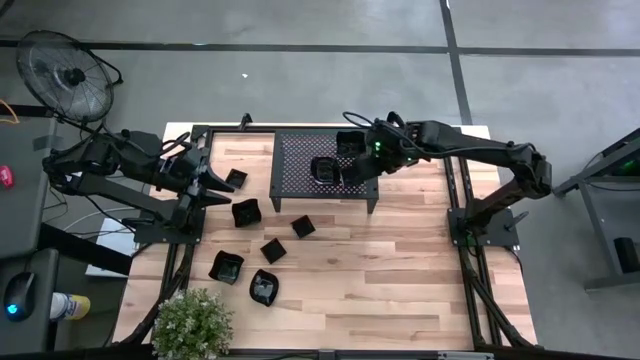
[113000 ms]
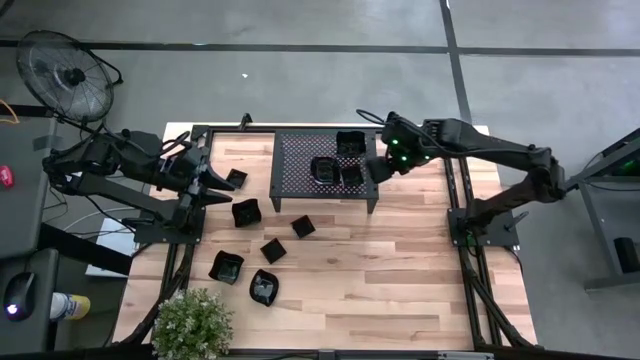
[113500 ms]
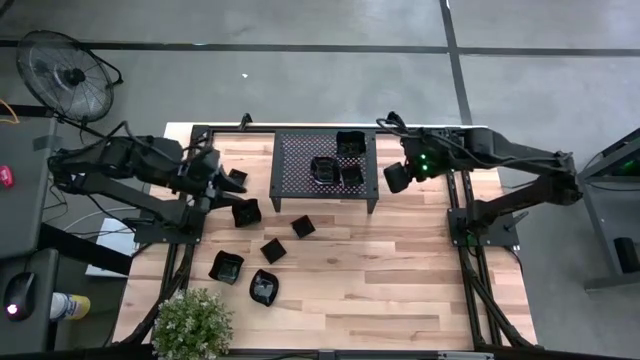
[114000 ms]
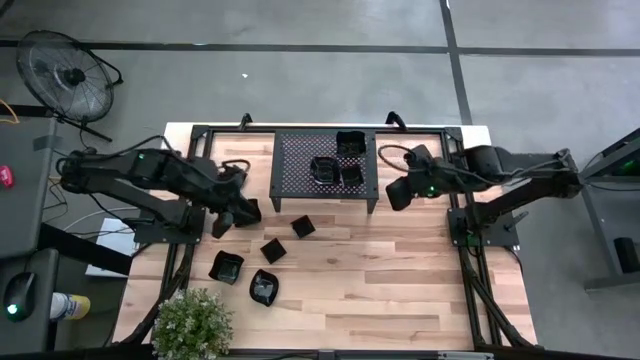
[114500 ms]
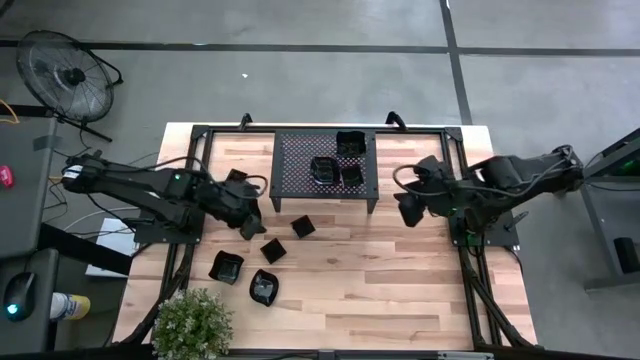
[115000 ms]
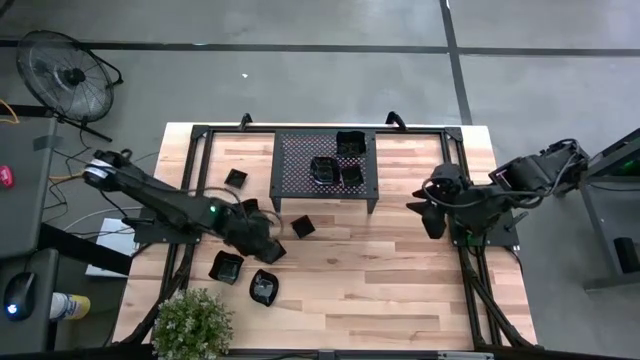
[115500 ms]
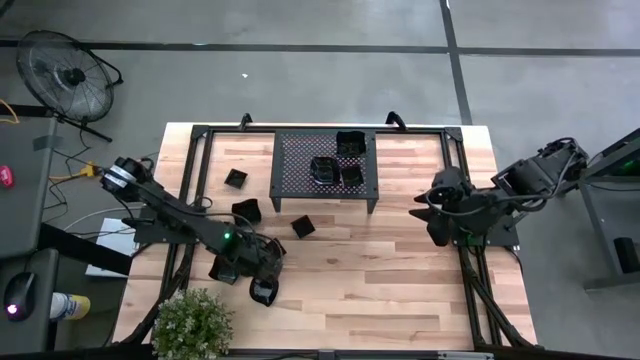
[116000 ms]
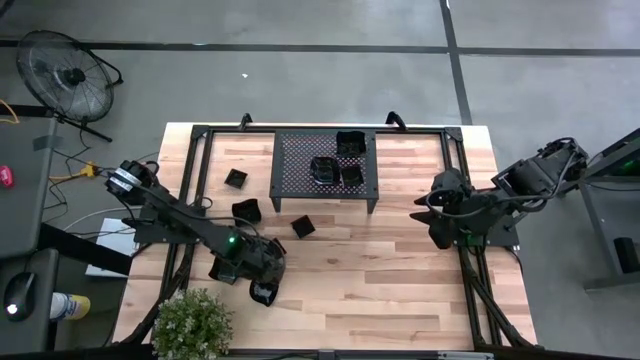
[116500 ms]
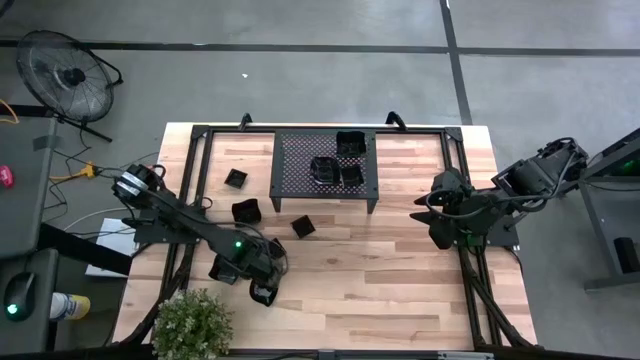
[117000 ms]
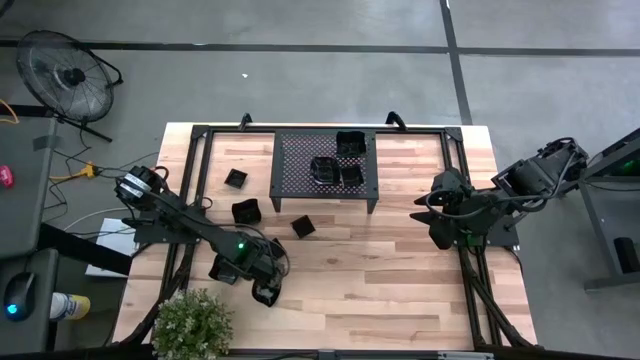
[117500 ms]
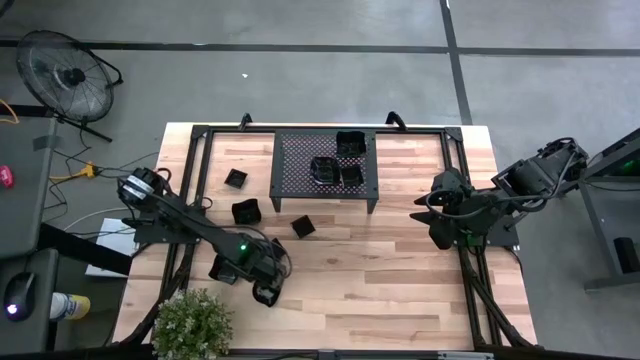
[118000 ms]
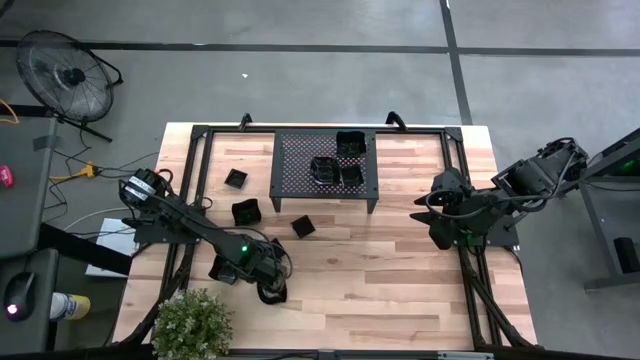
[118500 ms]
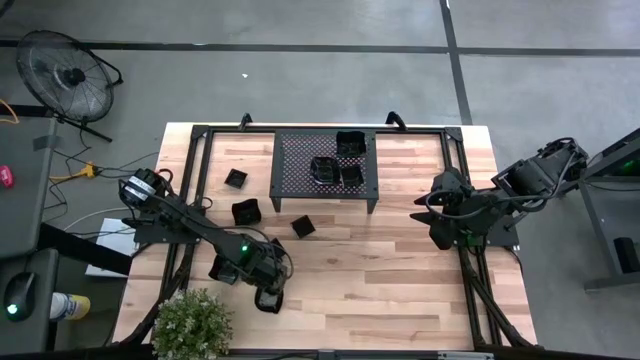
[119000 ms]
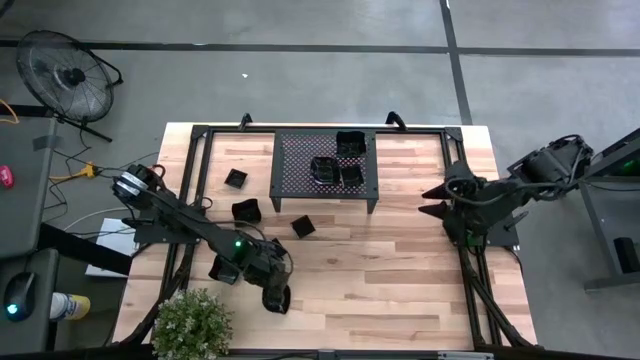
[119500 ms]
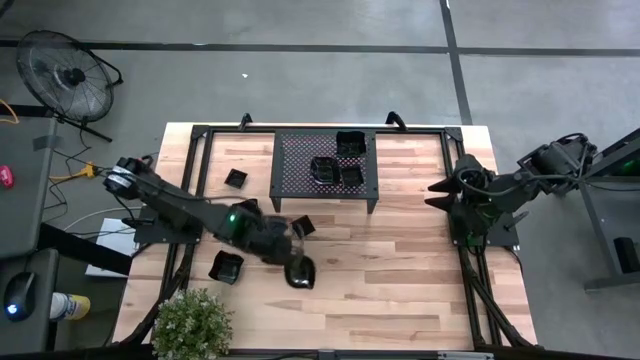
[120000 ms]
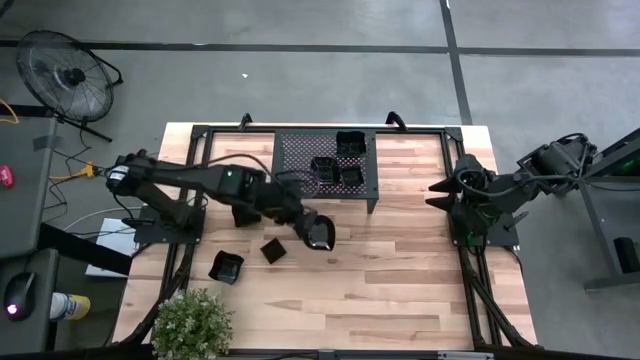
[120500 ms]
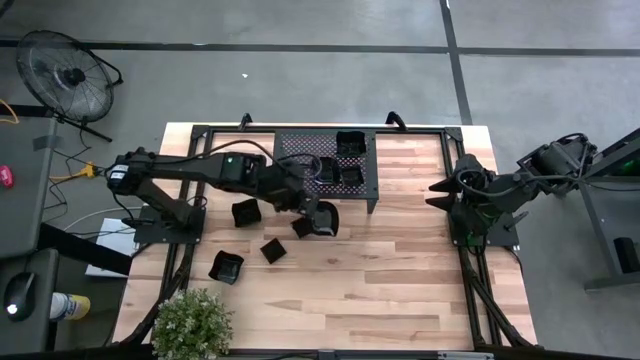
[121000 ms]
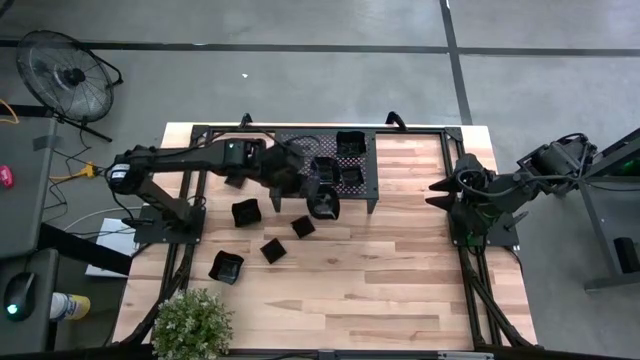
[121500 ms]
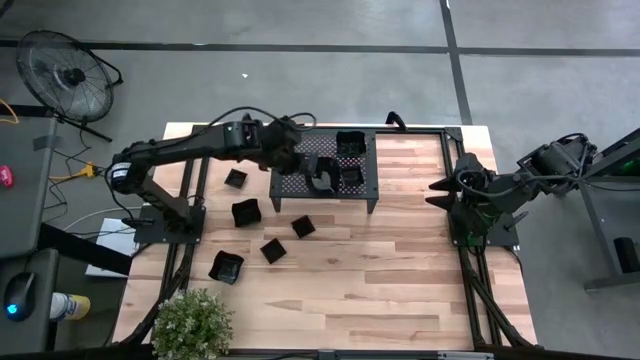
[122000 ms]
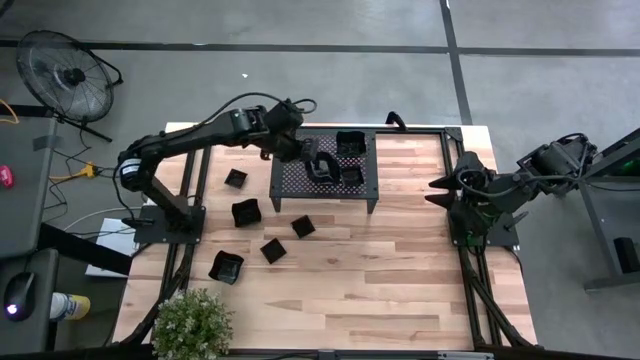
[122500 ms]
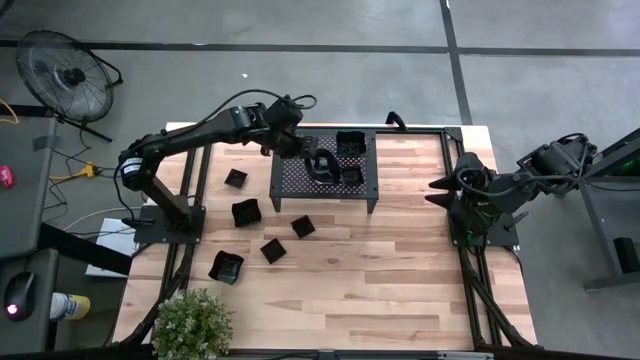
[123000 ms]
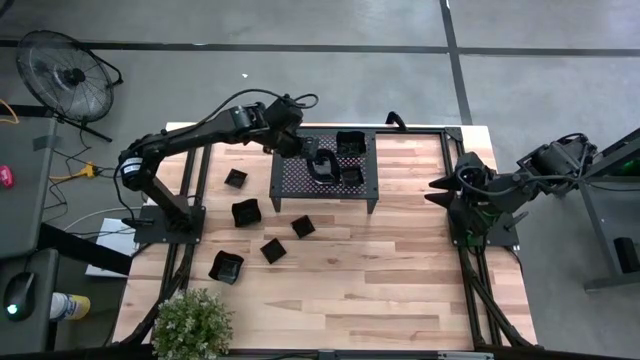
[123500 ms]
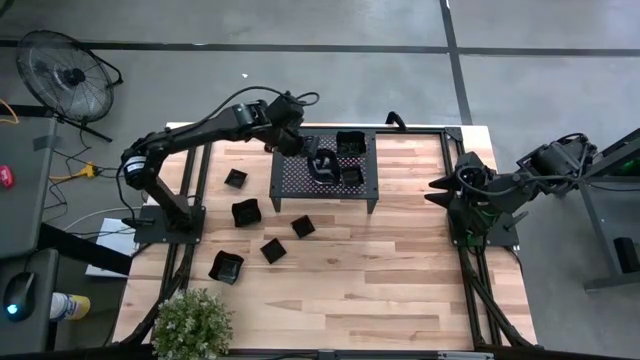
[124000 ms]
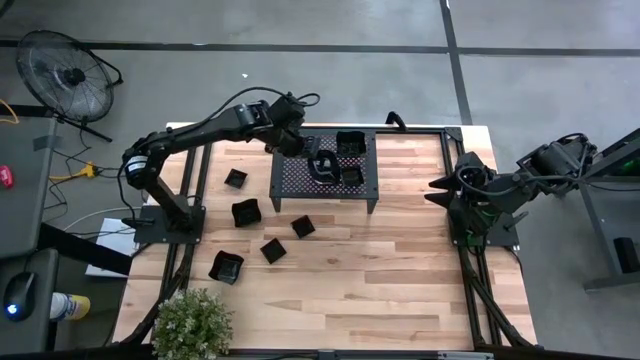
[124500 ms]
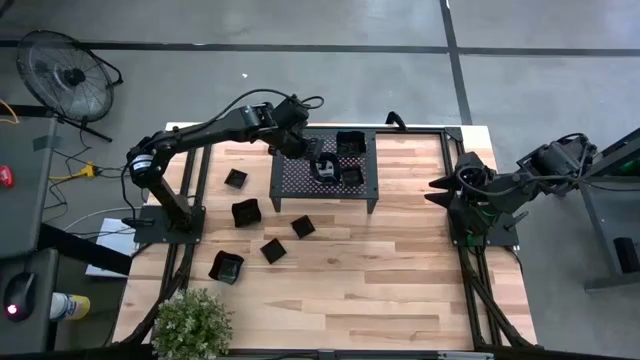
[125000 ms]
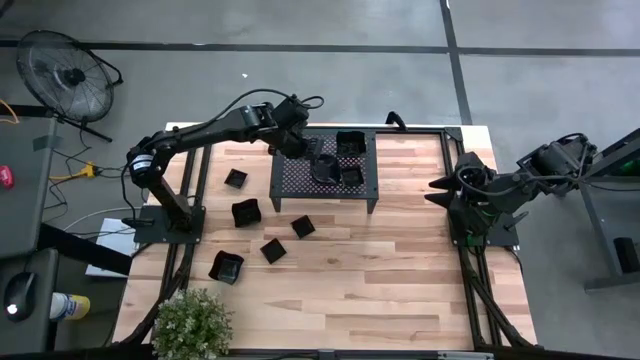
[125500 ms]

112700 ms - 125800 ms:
Task: Pick & Place Mini shaped plates
Stack the black leaf-shaped plate on top of the other black leaf-shaped plates on the shelf

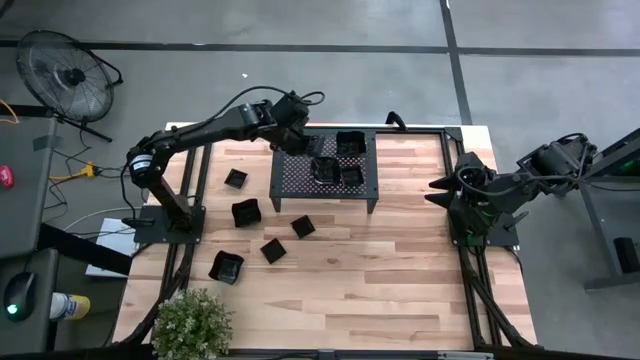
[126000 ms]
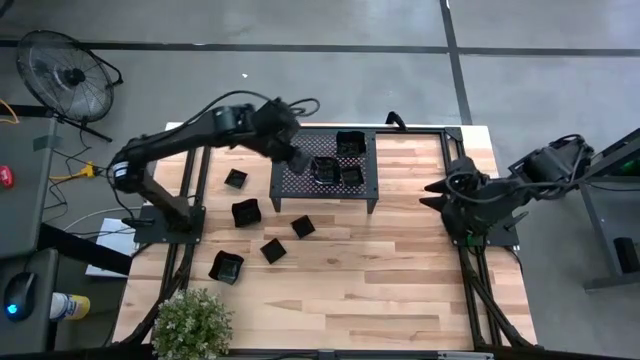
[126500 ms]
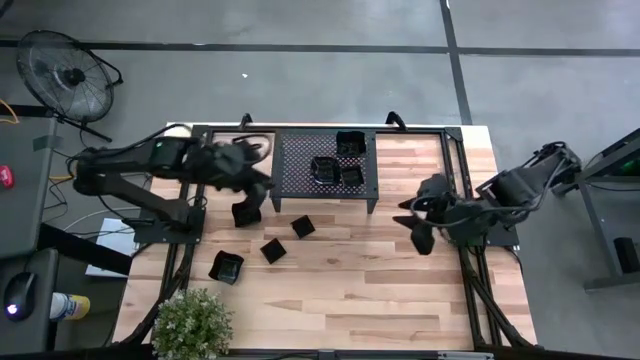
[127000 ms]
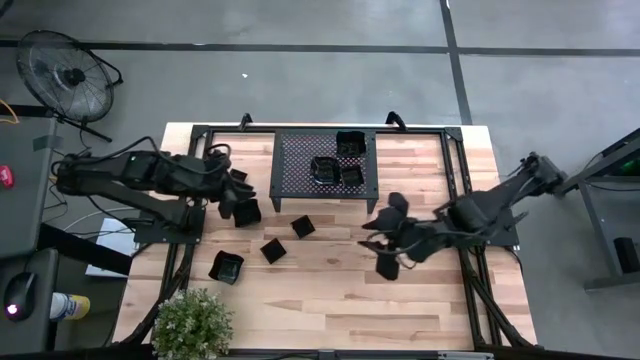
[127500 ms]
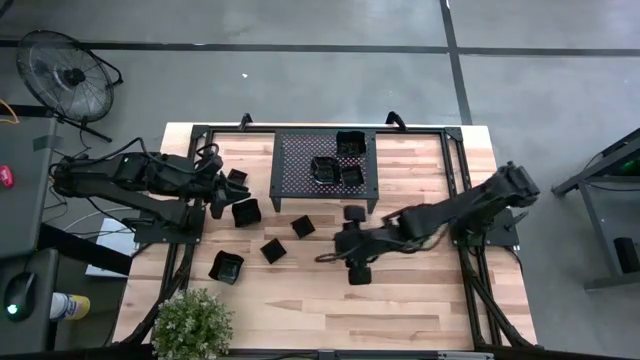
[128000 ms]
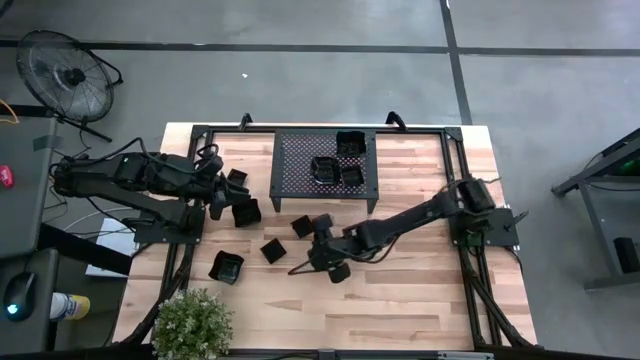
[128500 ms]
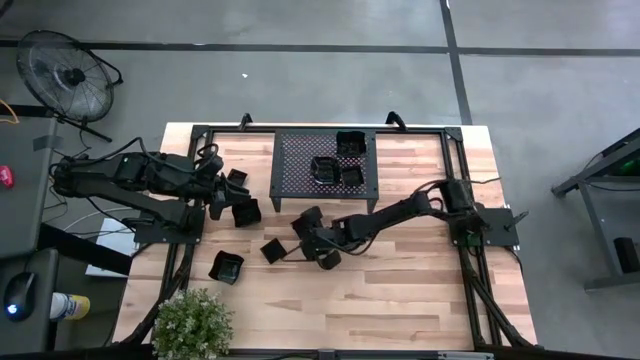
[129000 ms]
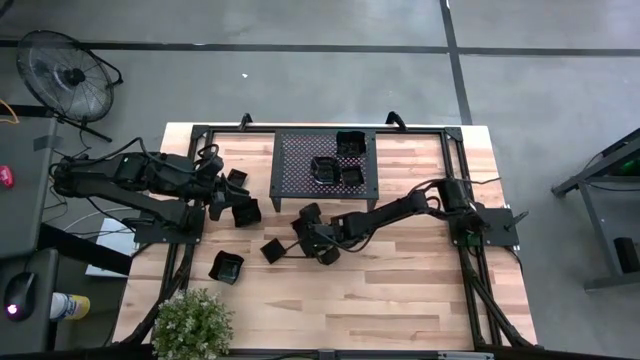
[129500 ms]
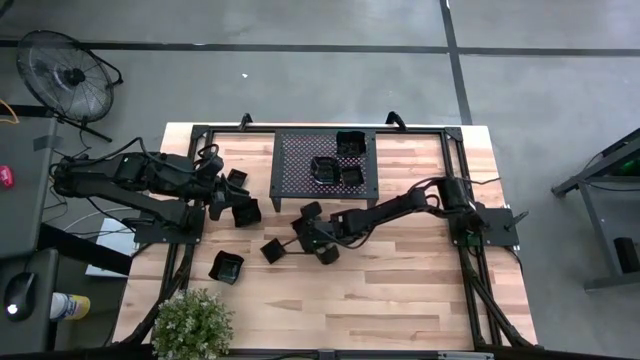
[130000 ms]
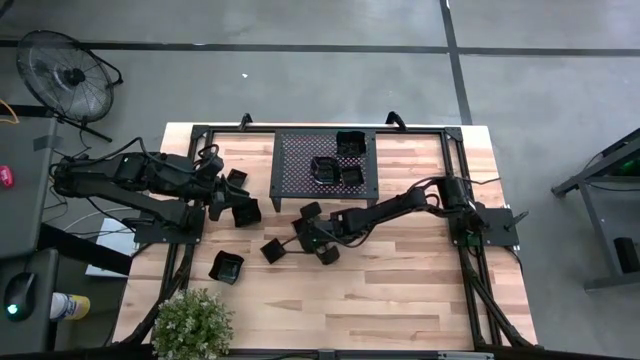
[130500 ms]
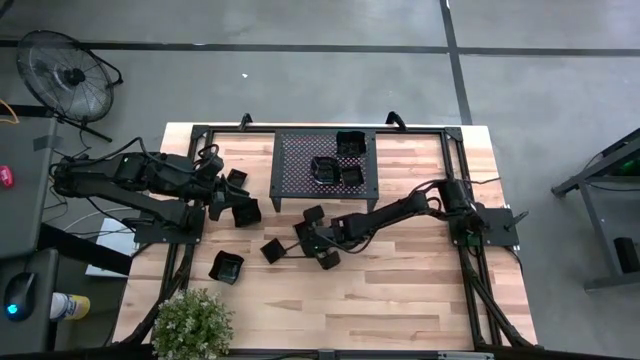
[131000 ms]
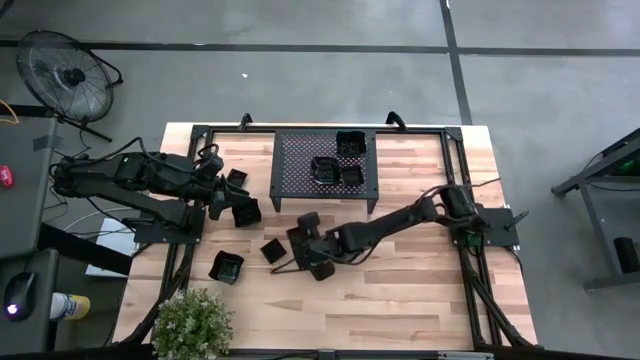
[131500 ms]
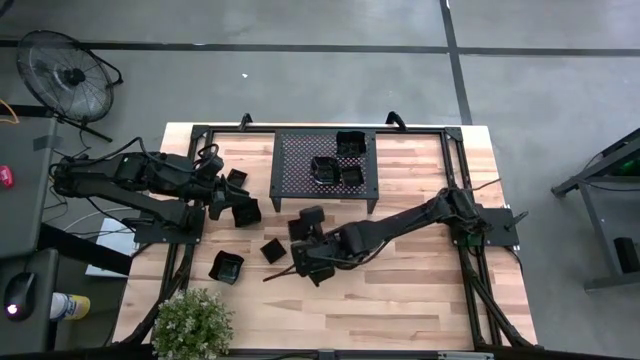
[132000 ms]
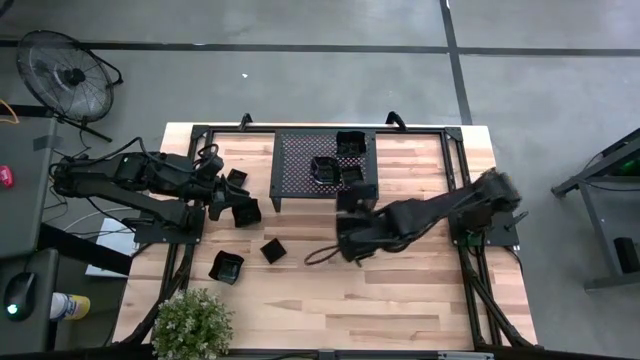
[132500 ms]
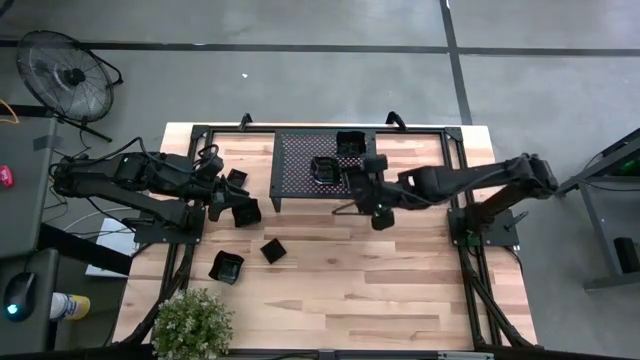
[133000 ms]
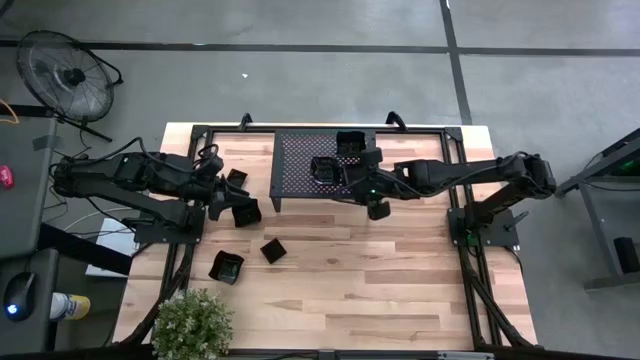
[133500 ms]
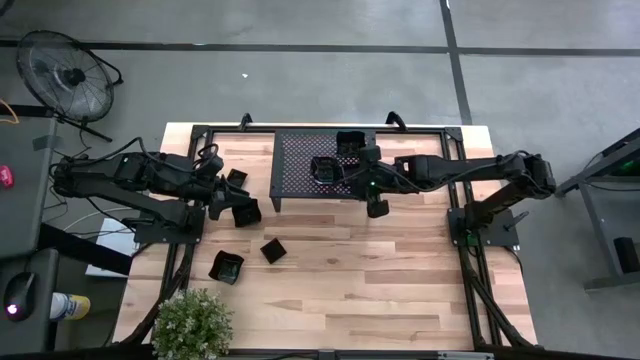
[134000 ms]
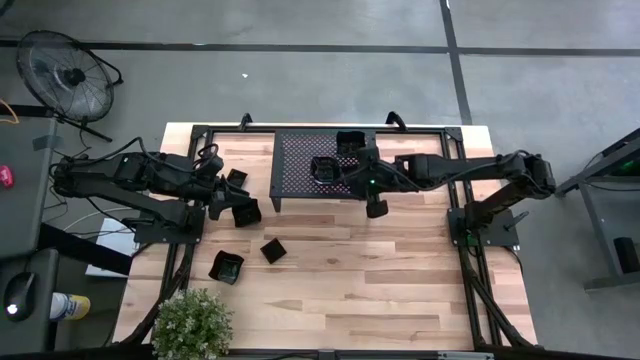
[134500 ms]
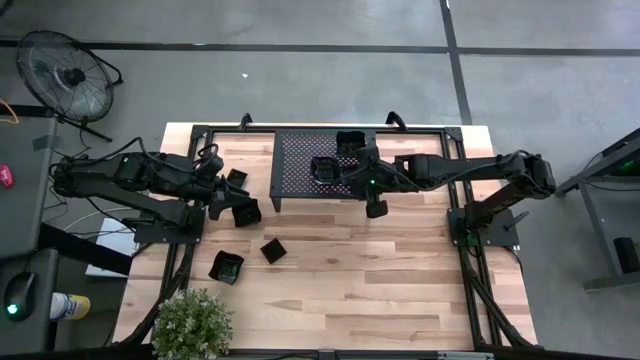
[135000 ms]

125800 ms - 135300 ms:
Stack the black square plate on top of the other black square plates on the shelf
